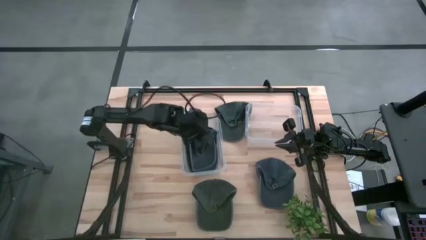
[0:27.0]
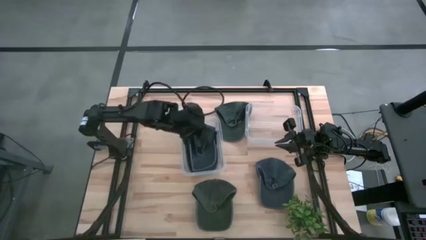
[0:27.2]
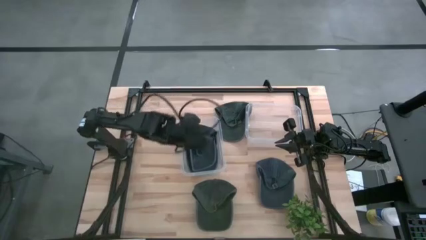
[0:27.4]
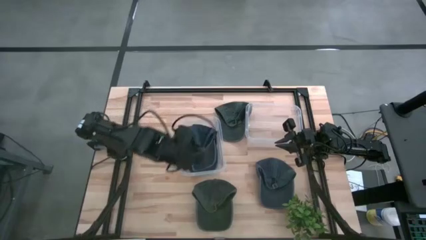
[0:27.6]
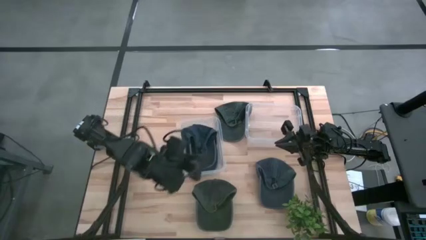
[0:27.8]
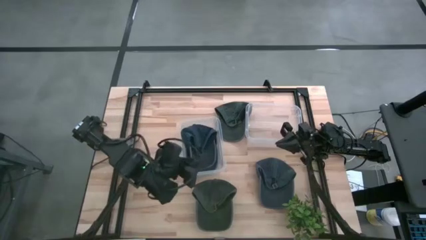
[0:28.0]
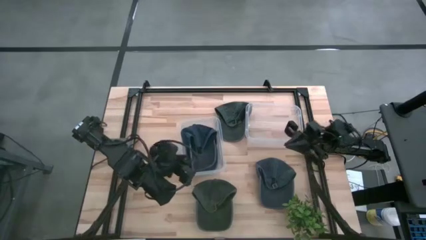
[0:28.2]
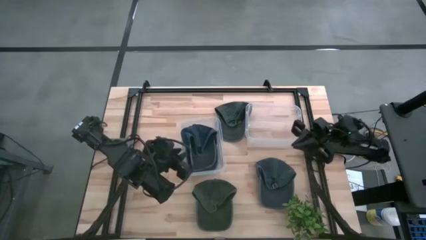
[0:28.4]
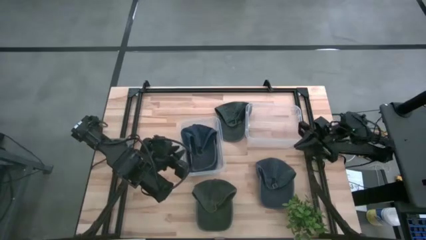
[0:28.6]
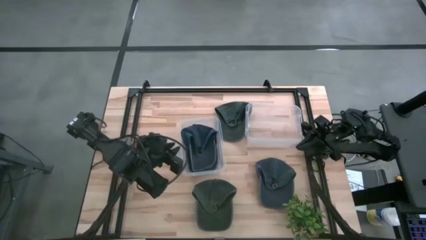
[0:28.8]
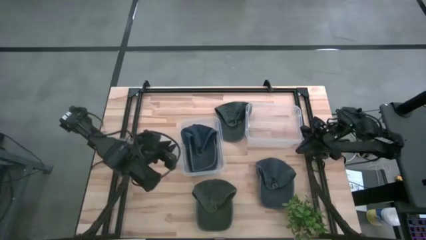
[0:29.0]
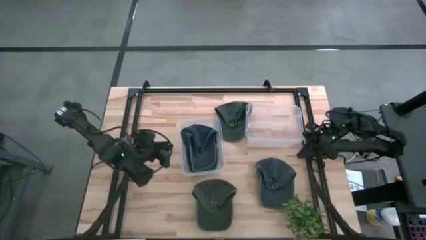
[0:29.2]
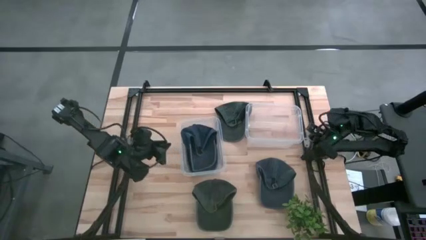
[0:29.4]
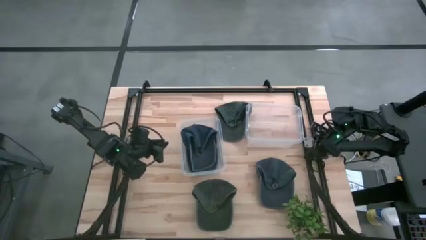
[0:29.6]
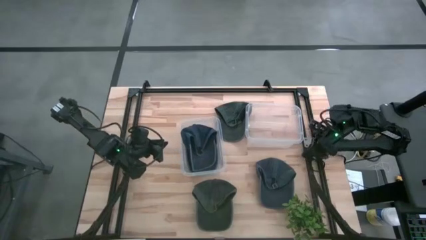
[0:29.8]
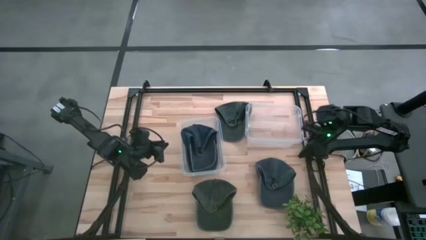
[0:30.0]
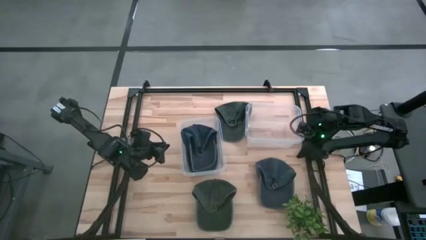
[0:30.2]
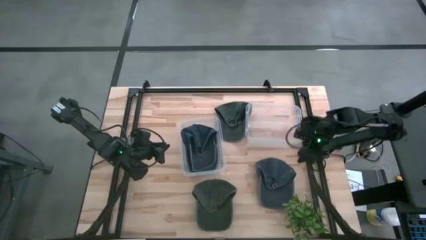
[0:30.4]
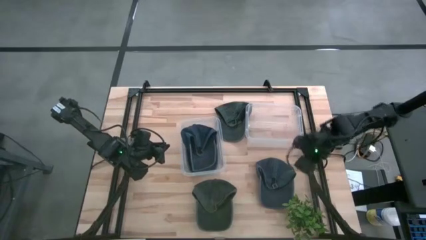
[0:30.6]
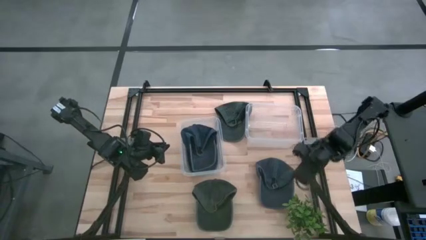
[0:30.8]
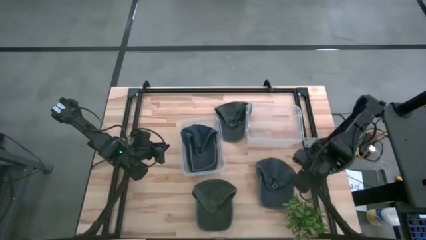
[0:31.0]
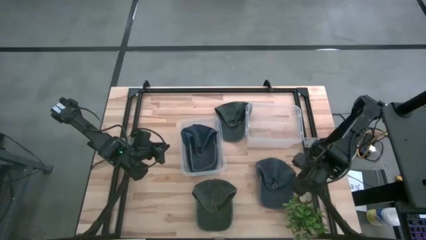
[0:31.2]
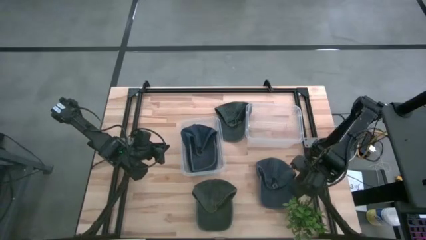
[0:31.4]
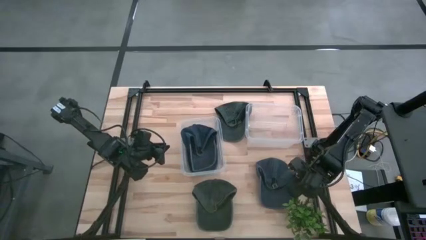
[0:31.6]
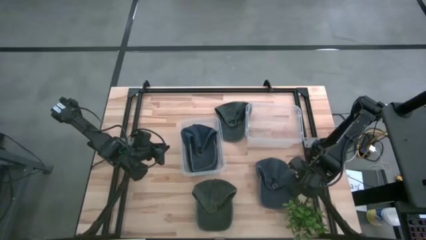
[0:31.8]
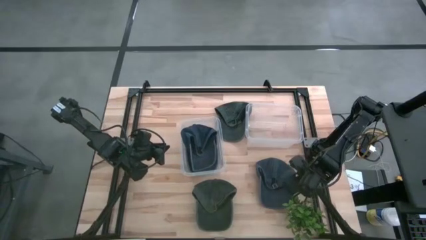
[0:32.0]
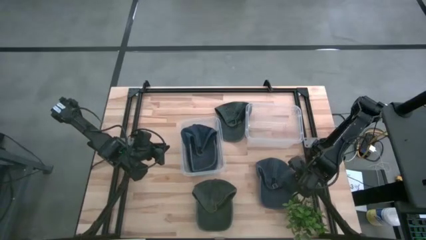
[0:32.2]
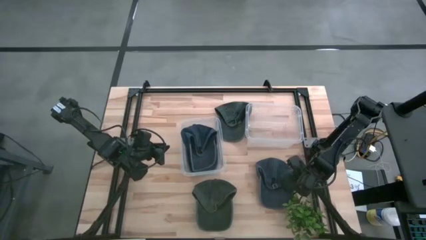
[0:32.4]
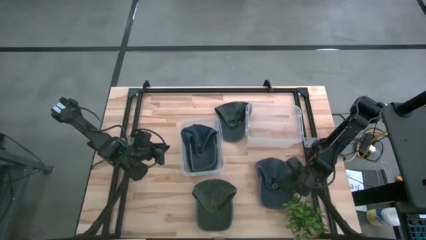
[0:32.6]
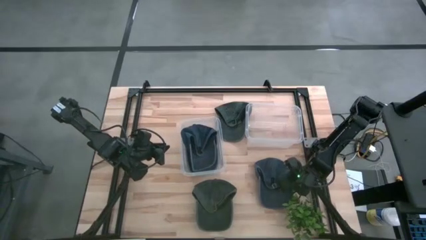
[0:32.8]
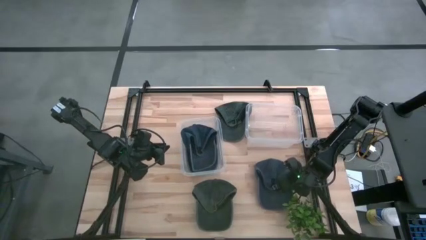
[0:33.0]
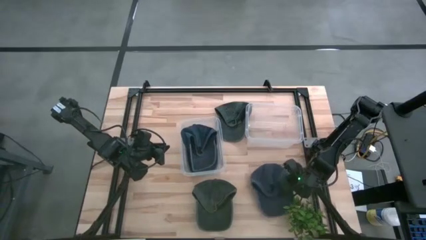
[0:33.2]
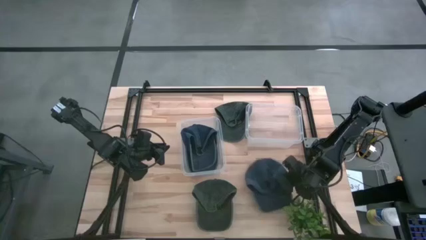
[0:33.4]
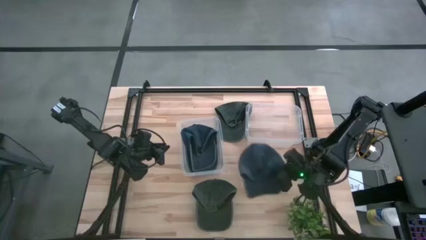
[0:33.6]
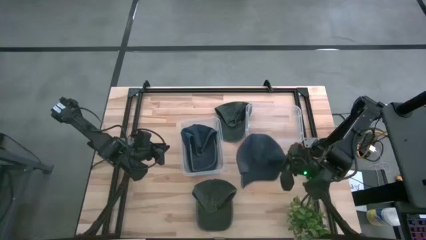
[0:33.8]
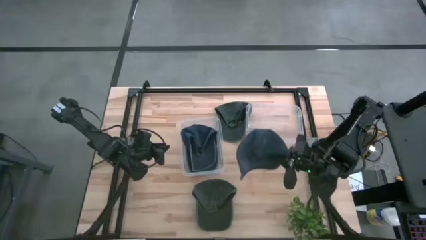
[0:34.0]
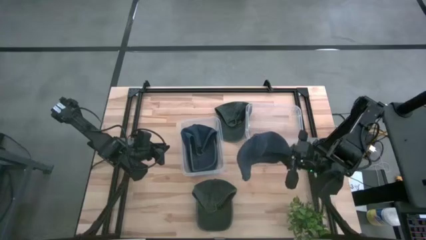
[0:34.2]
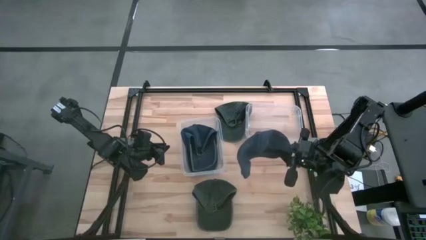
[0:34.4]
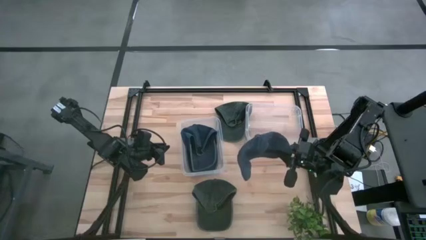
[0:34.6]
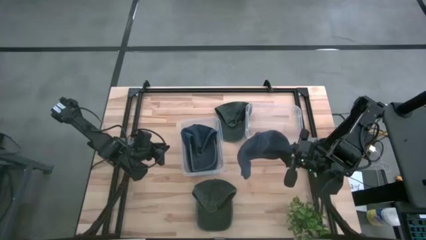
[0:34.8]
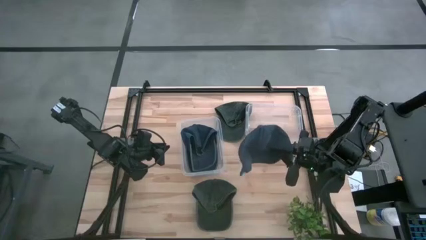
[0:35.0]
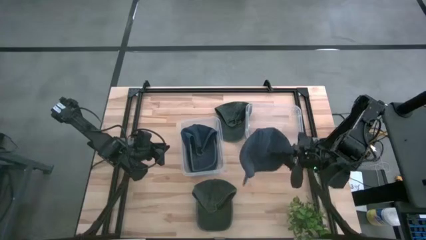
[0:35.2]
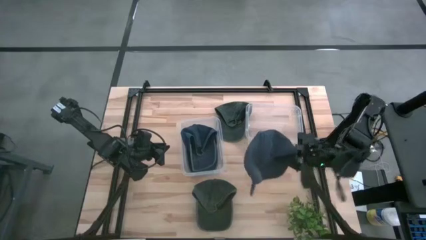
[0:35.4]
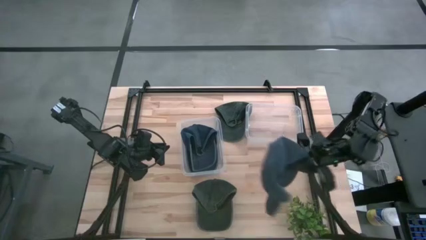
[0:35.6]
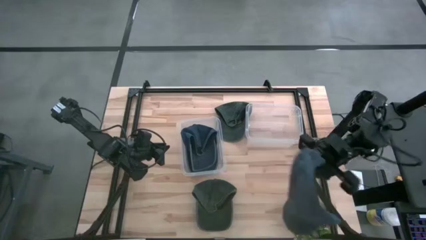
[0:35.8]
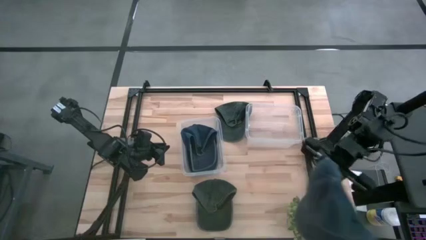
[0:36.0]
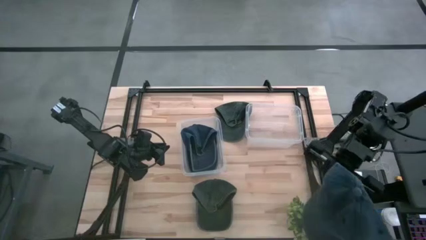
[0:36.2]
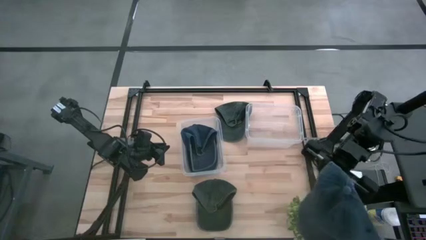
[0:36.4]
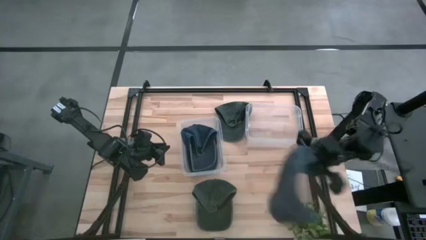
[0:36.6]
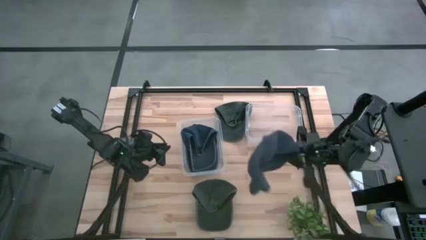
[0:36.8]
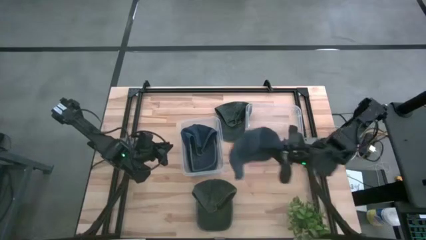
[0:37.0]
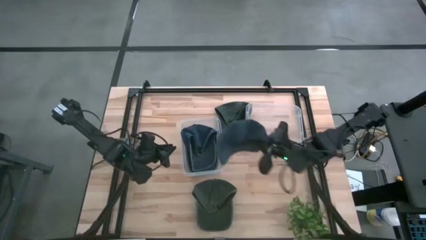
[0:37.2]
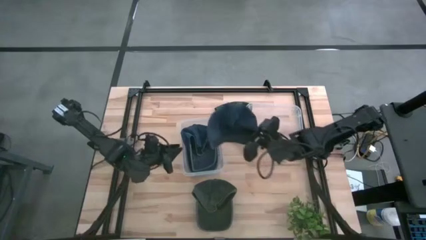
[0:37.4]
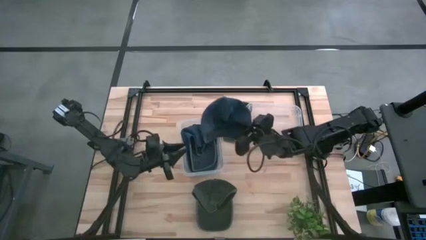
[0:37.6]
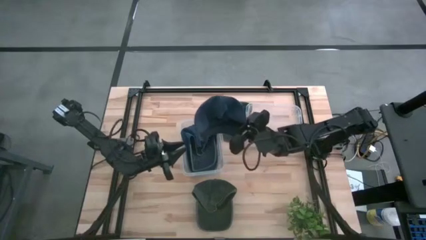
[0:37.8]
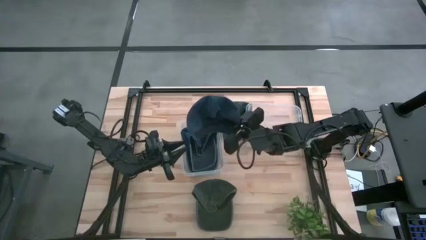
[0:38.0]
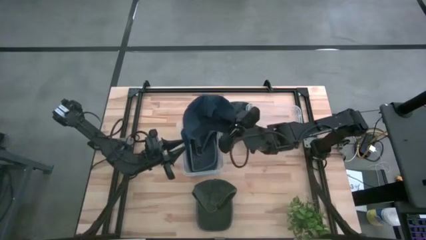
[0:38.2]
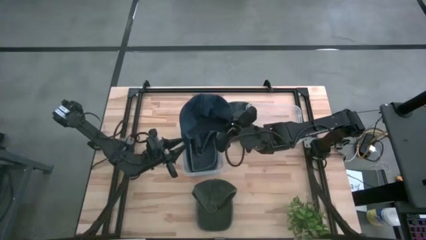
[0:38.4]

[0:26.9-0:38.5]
Task: Pick and place caps into container
Put the blue cap into the left transparent container

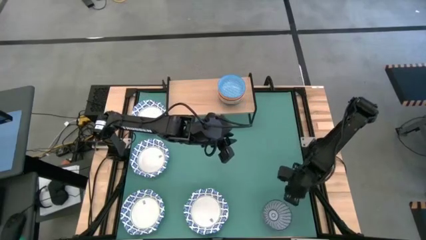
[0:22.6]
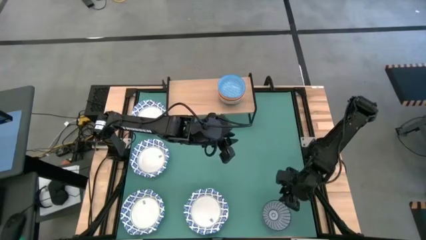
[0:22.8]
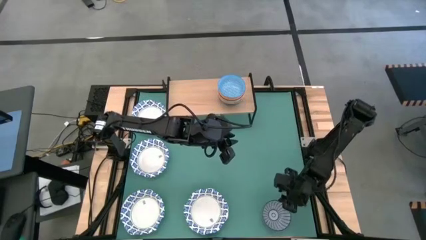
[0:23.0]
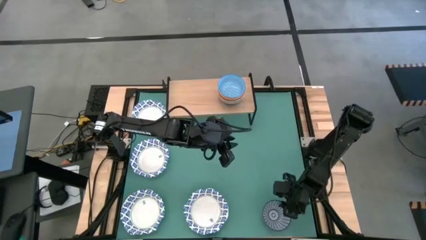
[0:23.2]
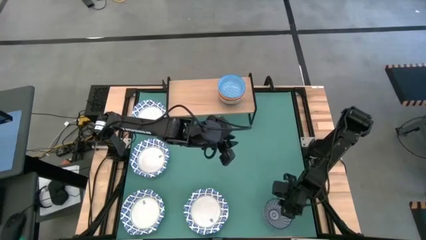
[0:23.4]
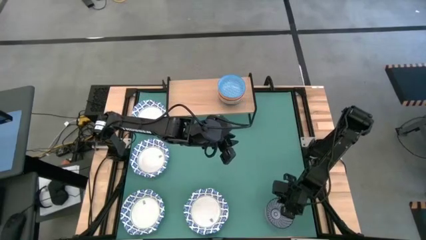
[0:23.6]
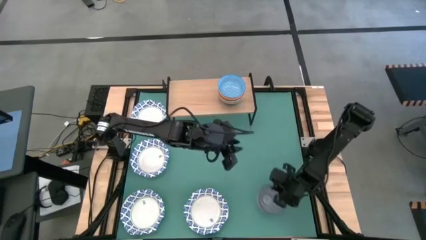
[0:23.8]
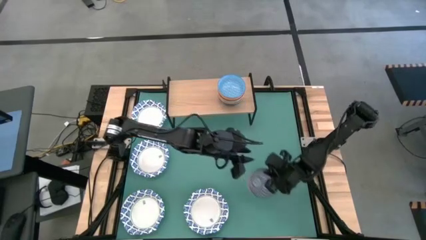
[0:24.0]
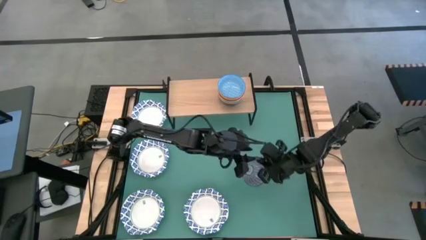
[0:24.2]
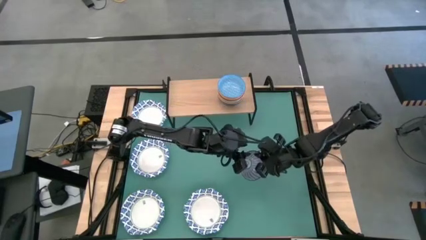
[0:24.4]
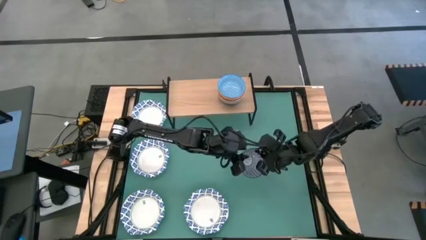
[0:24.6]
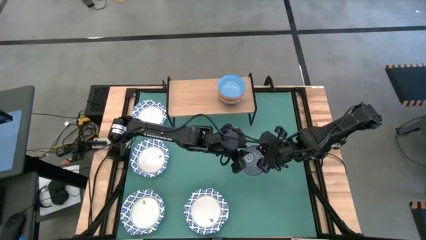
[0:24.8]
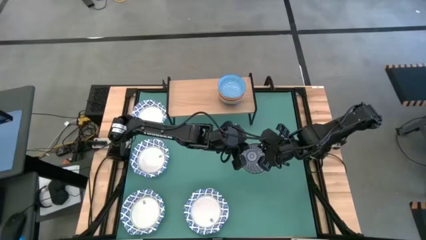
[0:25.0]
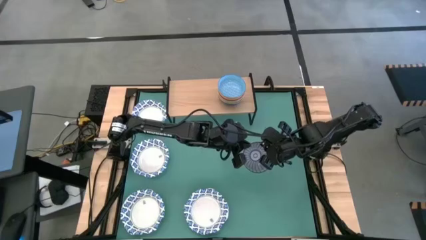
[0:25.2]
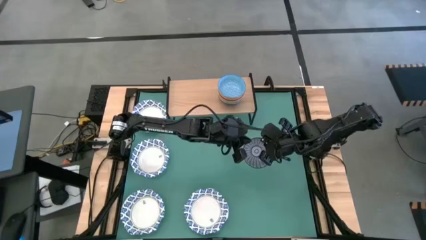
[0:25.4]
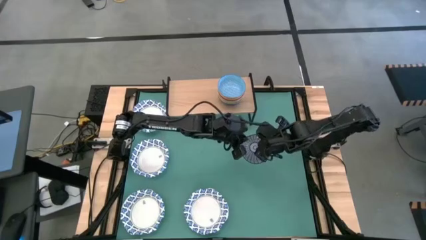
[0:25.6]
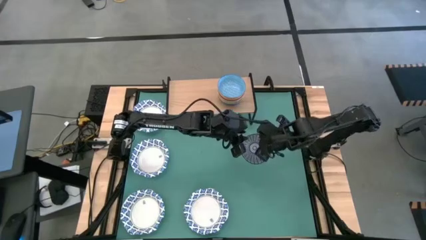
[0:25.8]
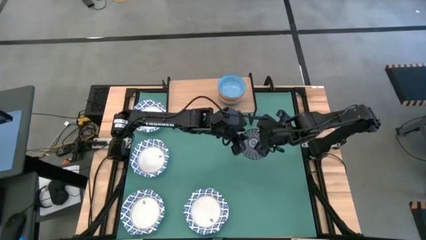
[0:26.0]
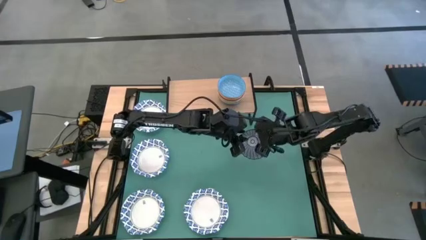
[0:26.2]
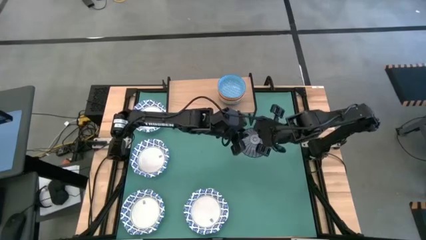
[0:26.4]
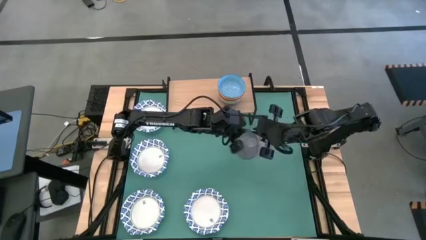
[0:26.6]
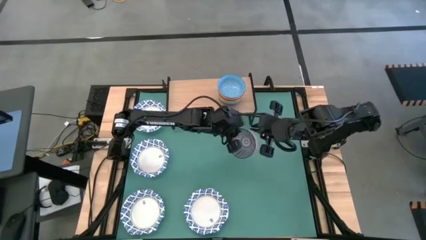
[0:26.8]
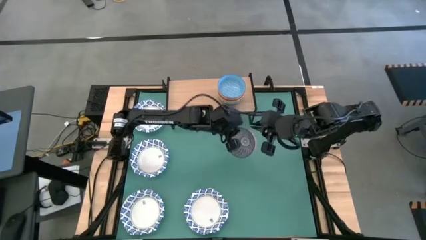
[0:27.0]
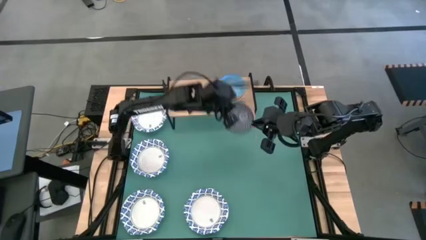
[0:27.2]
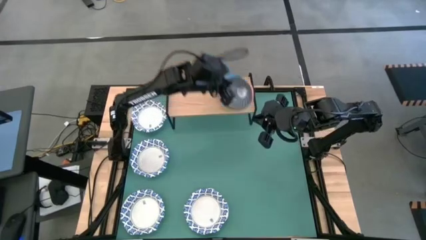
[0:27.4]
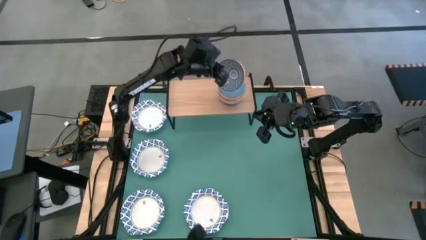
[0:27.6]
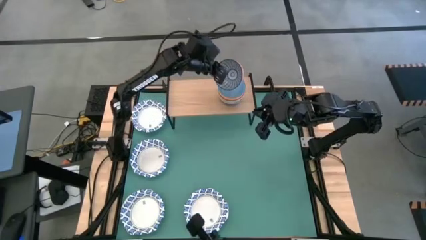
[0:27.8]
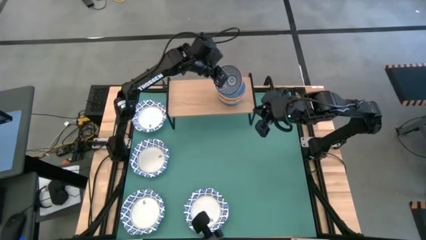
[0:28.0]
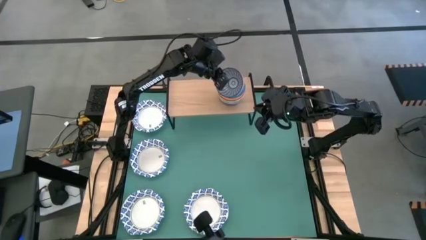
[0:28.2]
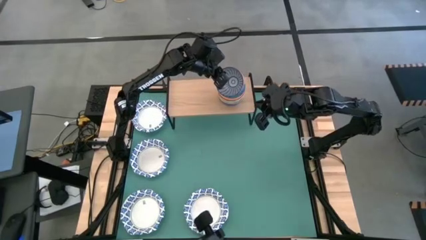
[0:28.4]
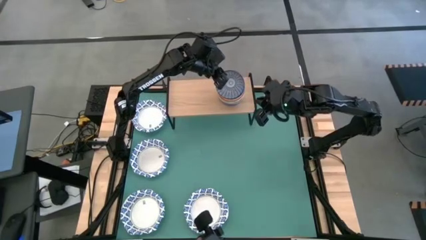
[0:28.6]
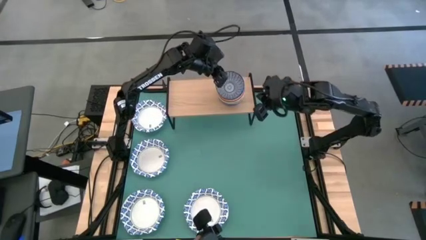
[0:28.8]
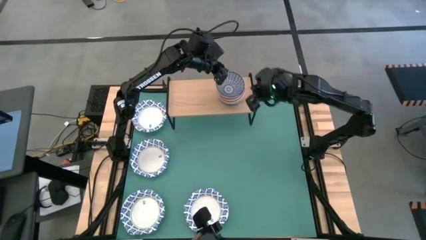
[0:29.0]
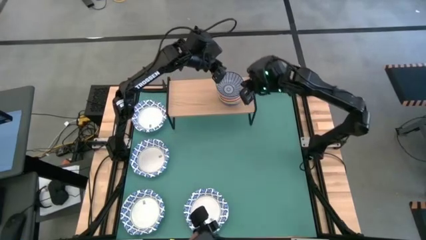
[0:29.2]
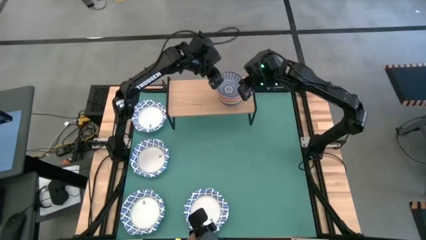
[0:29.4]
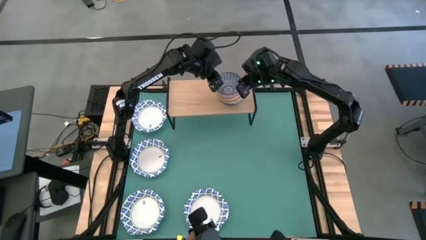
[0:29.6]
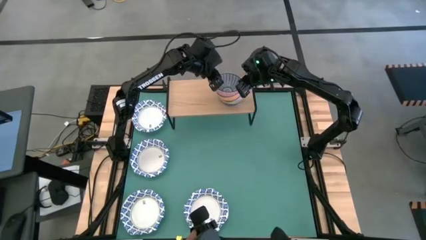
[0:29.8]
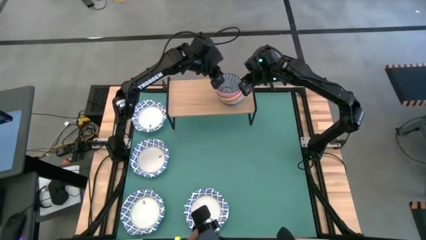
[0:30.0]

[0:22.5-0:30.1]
Task: Place and stack bowls onto a shelf
Stack the small dark blue bowl on the small blue bowl on the shelf
